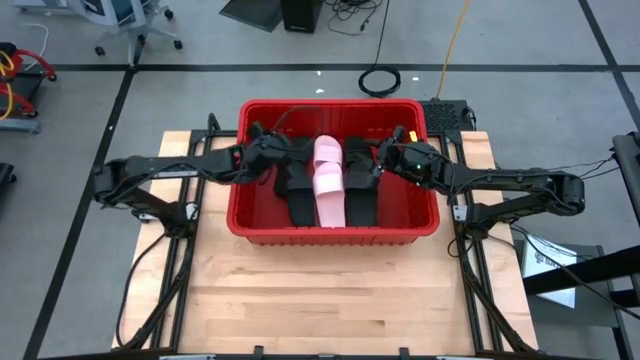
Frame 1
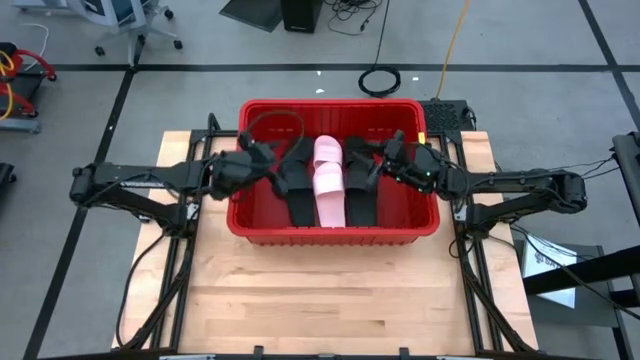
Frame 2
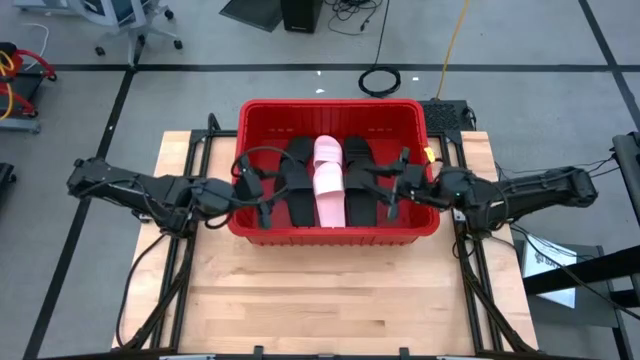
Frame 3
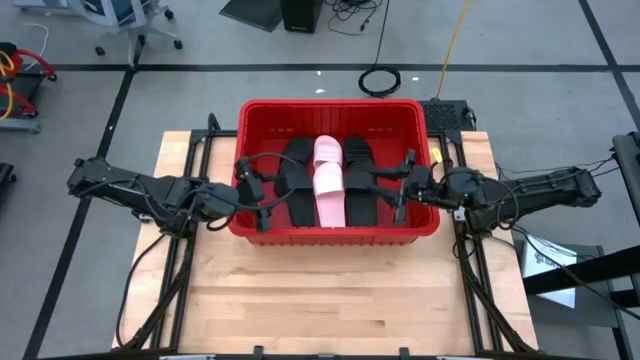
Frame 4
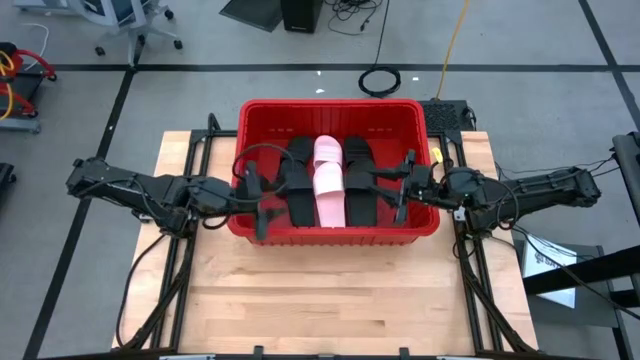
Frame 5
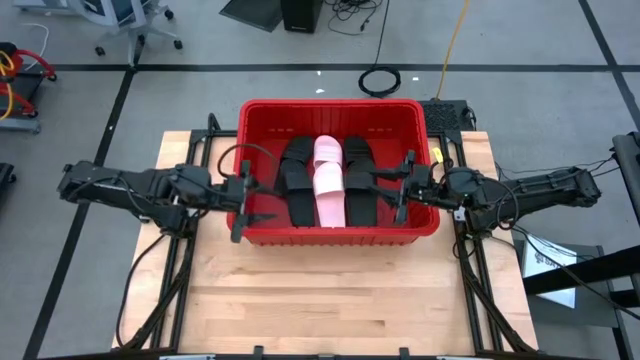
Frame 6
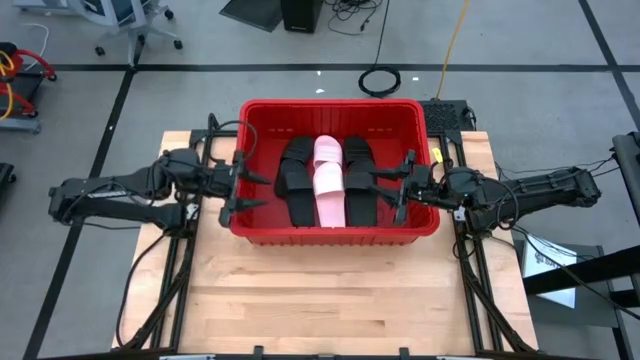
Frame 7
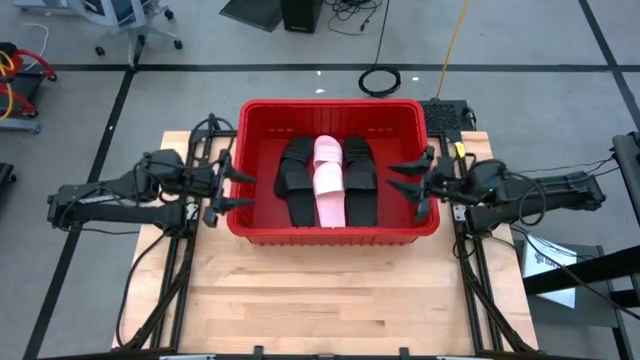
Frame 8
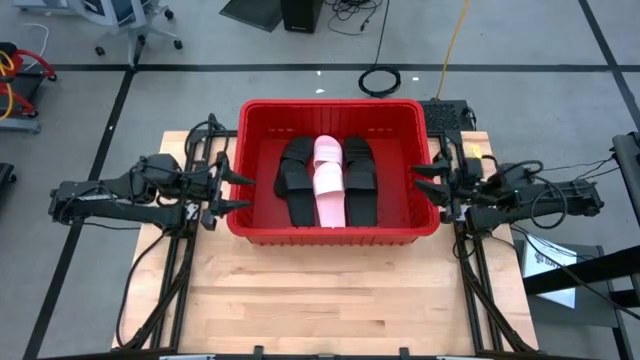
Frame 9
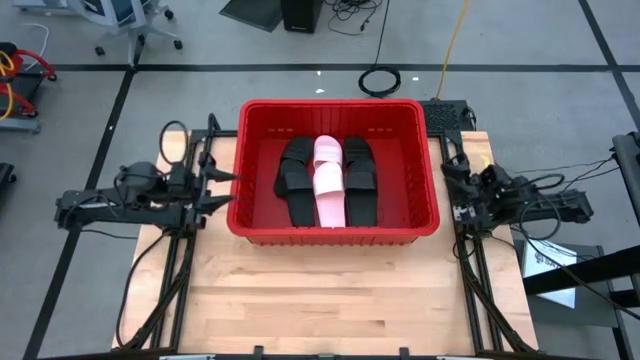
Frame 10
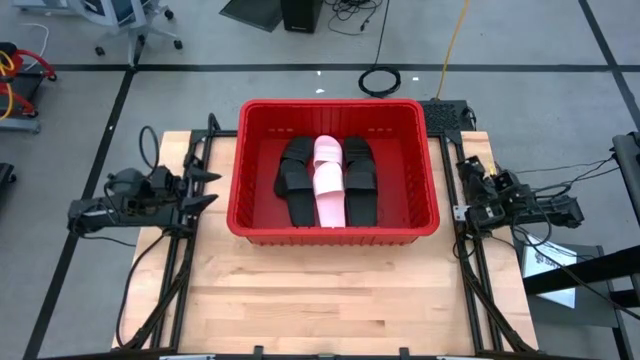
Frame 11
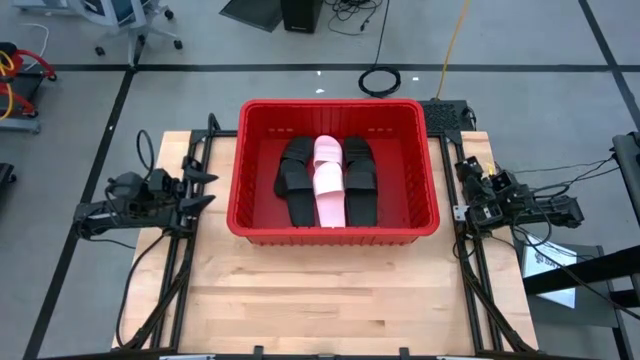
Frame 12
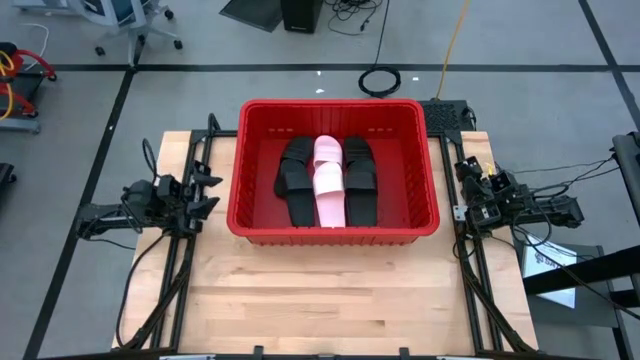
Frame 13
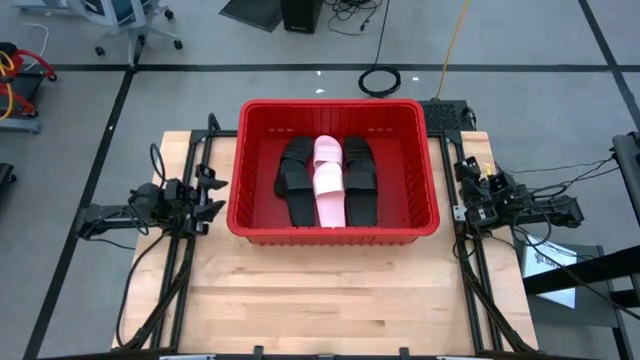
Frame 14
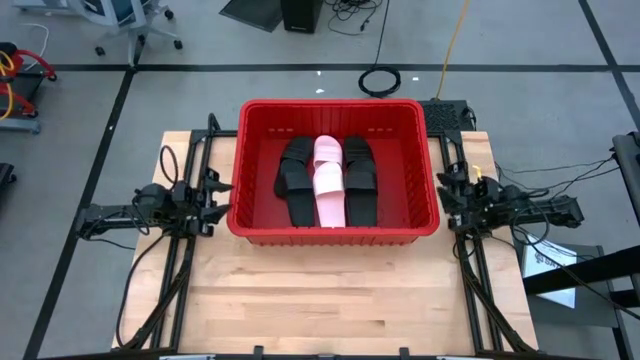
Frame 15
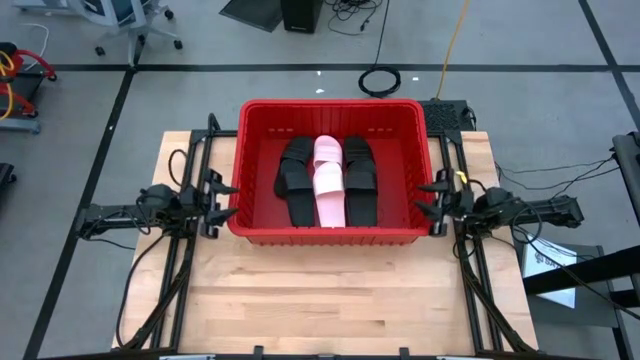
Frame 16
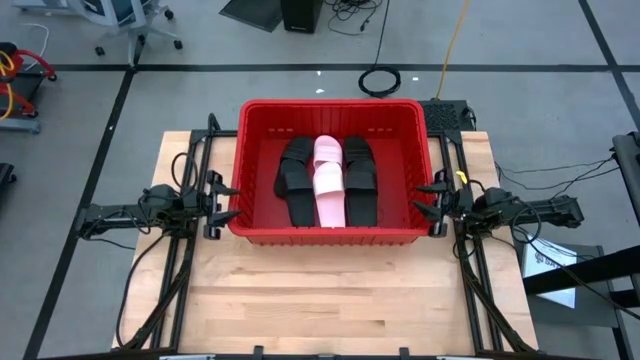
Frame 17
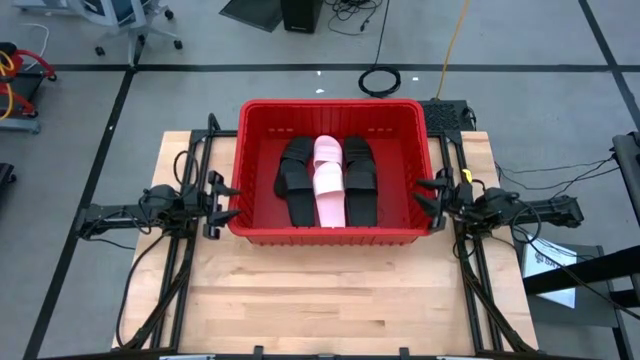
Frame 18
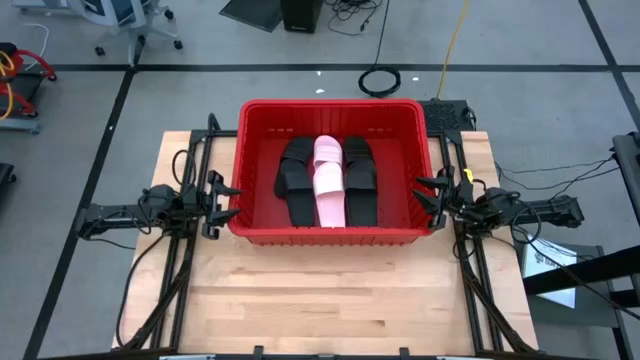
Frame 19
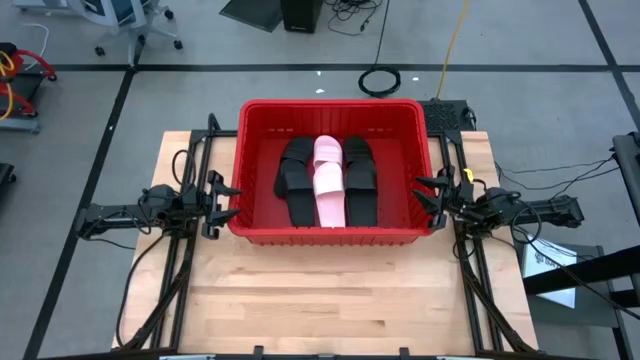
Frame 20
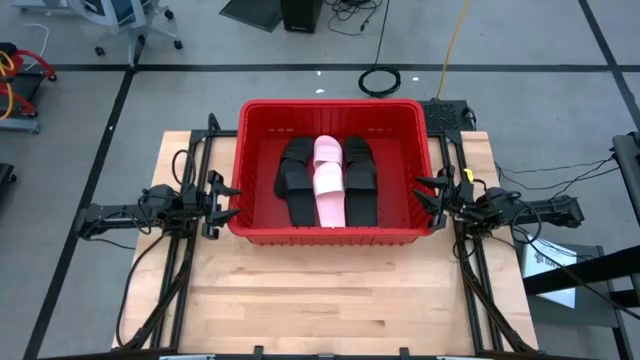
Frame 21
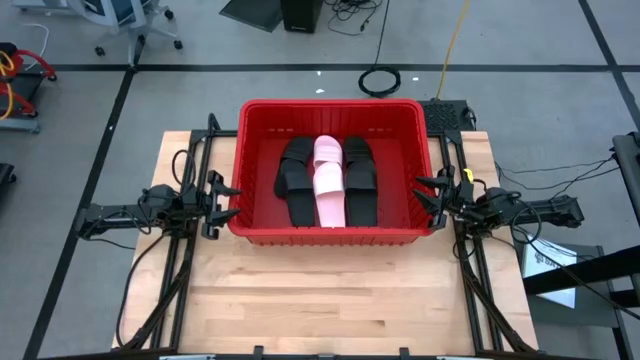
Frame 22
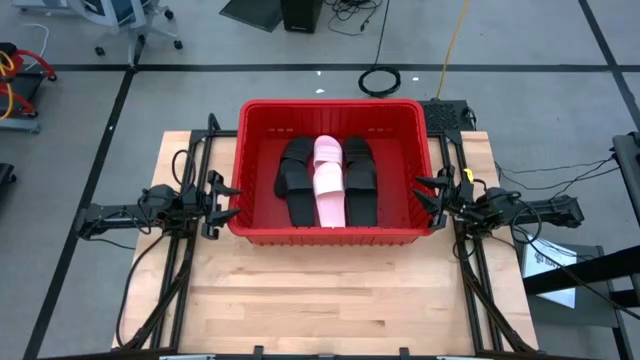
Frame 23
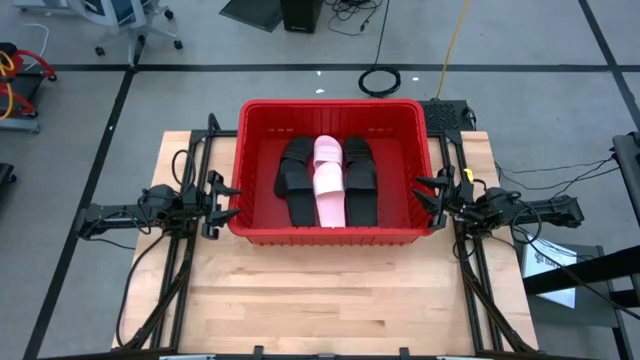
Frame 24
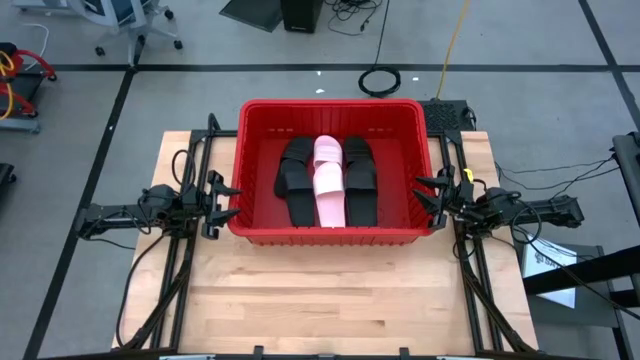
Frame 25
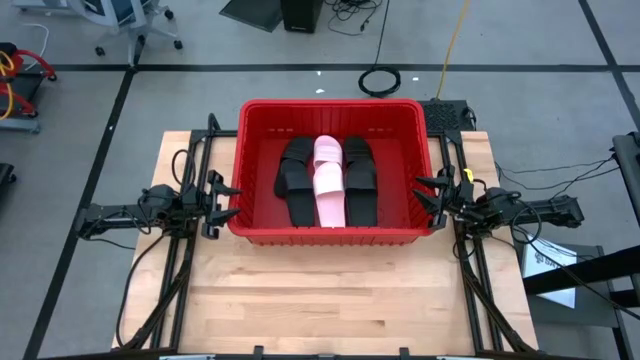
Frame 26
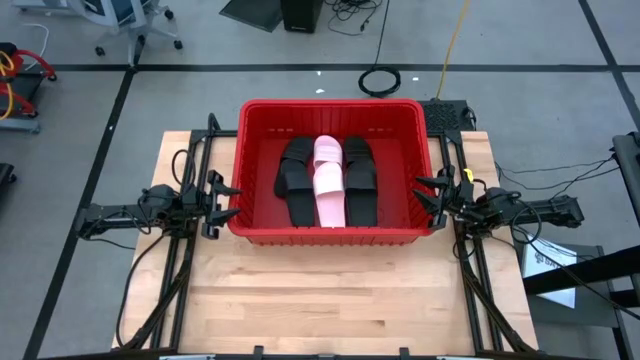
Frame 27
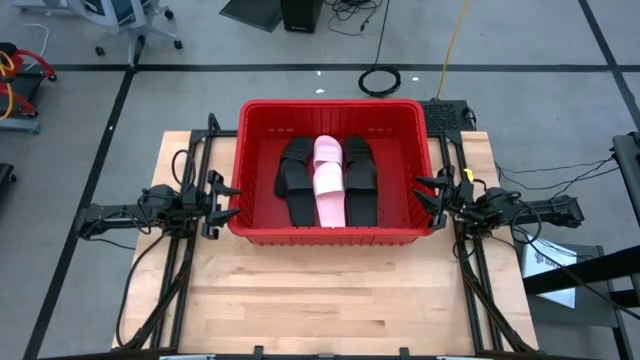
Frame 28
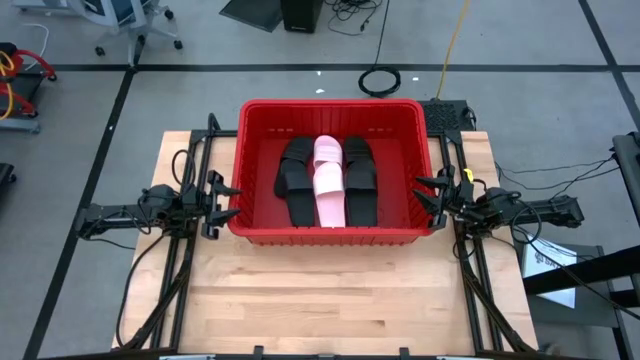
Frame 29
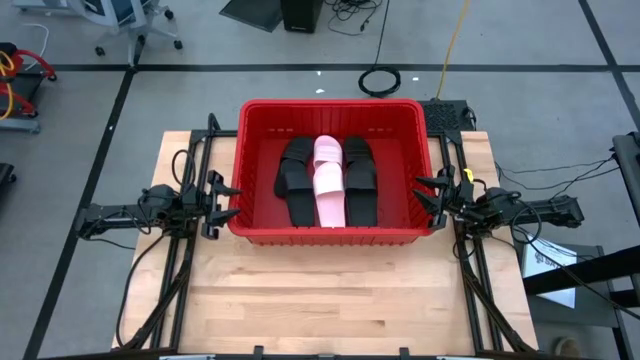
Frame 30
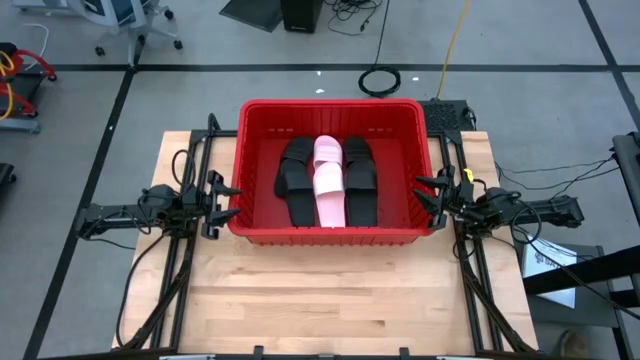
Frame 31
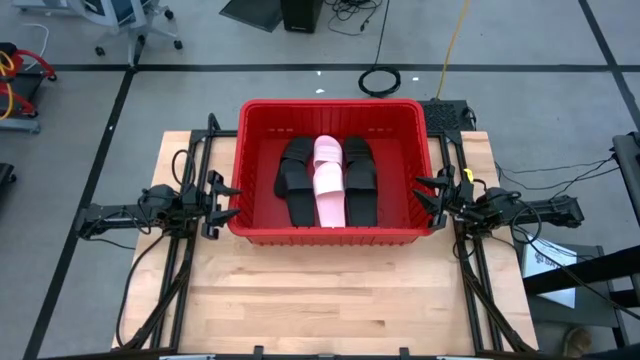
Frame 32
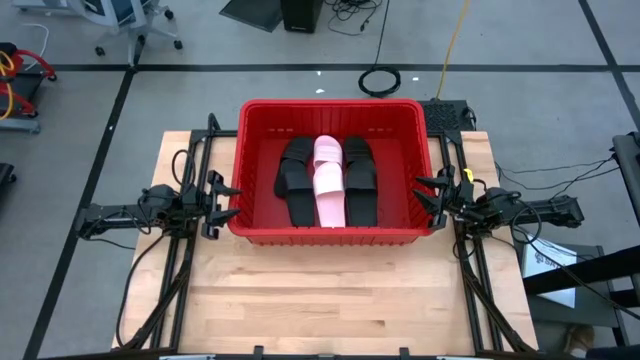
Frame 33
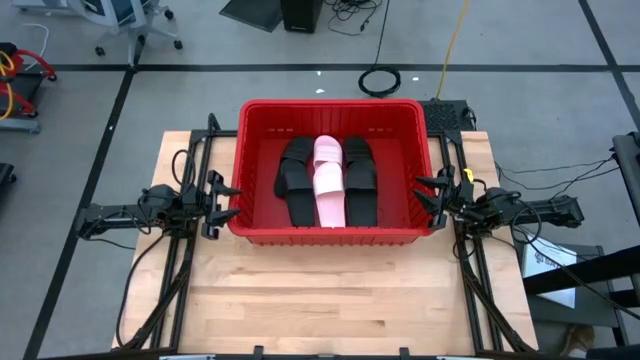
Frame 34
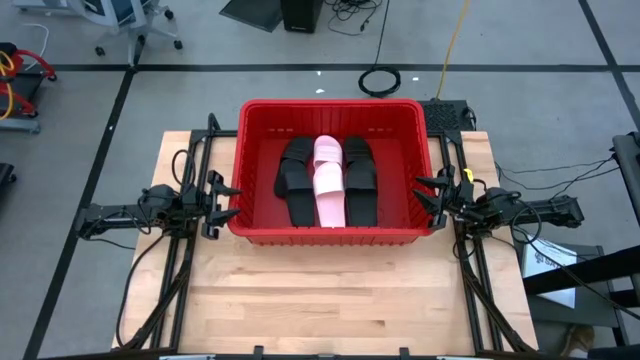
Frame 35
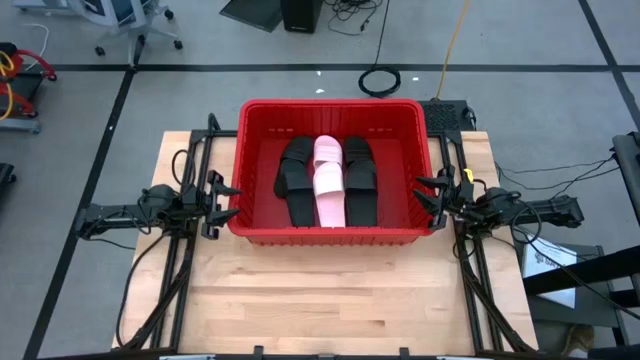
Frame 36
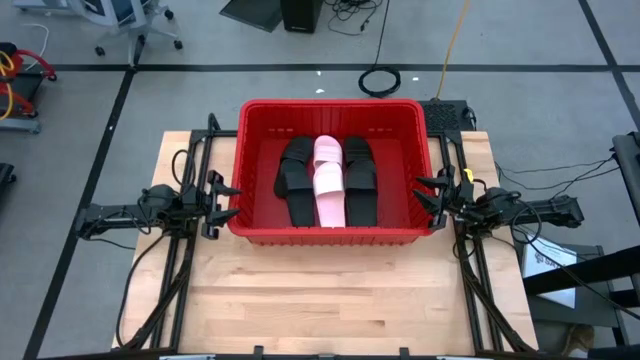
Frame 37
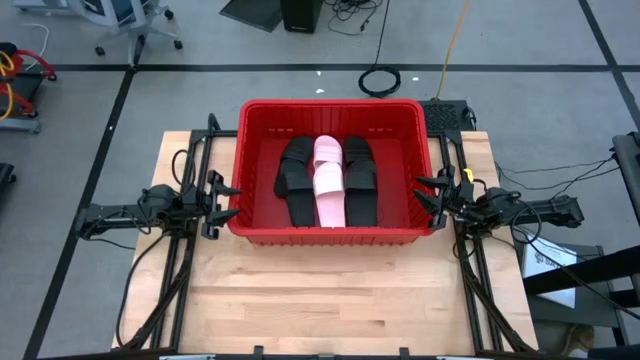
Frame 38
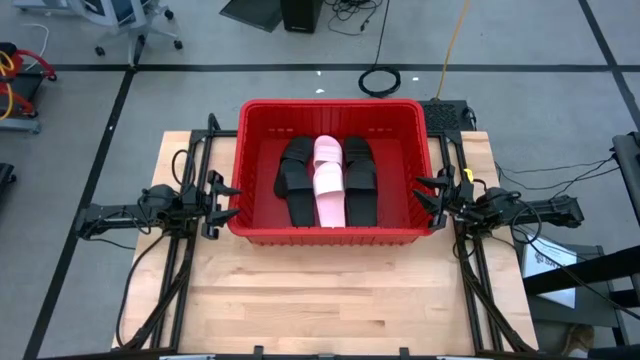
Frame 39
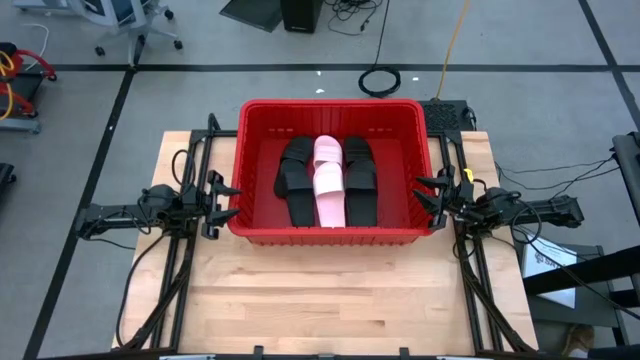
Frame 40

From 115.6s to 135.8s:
Task: Pick and place slides into bin
Return to Home Position

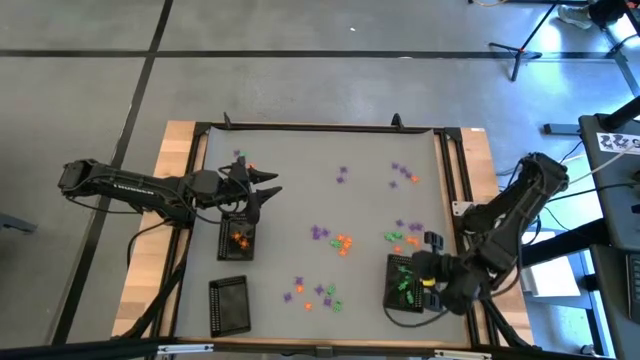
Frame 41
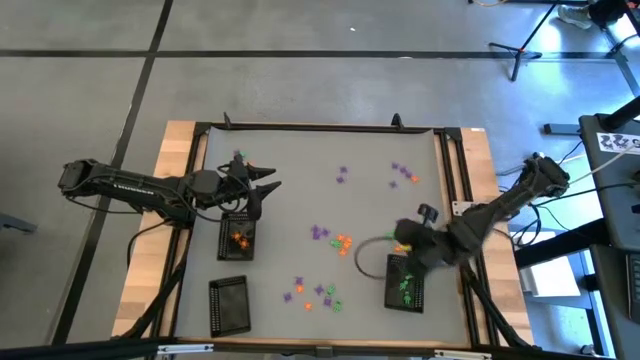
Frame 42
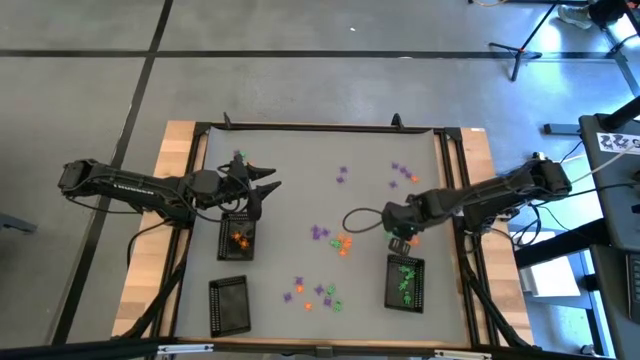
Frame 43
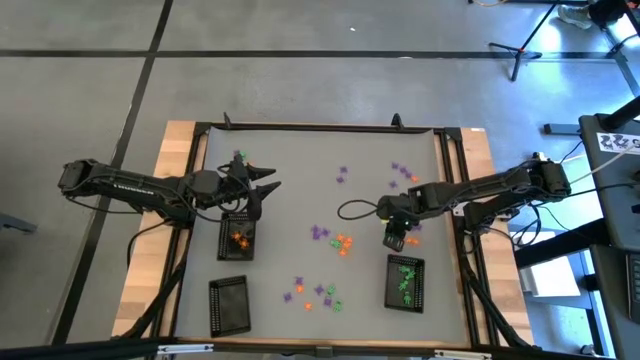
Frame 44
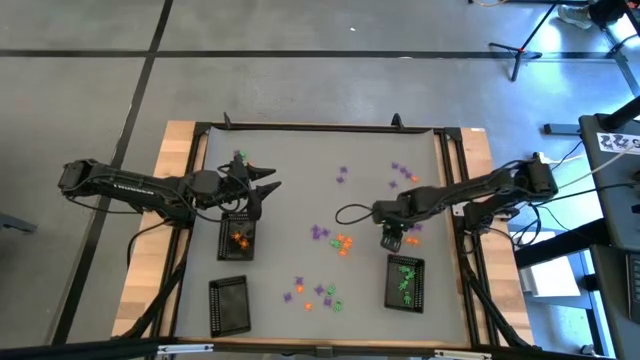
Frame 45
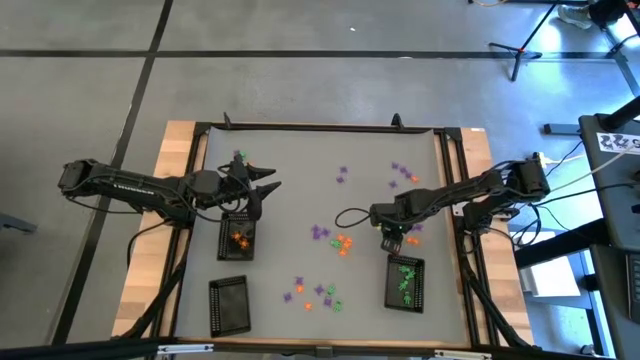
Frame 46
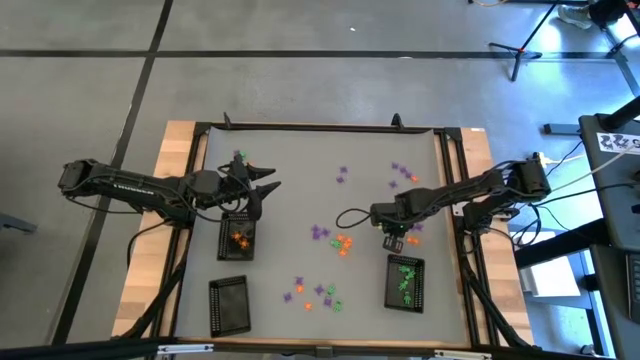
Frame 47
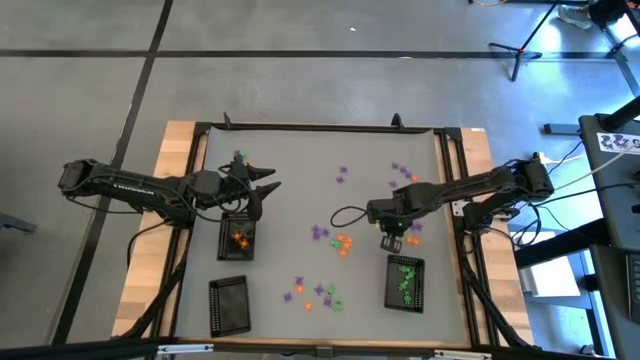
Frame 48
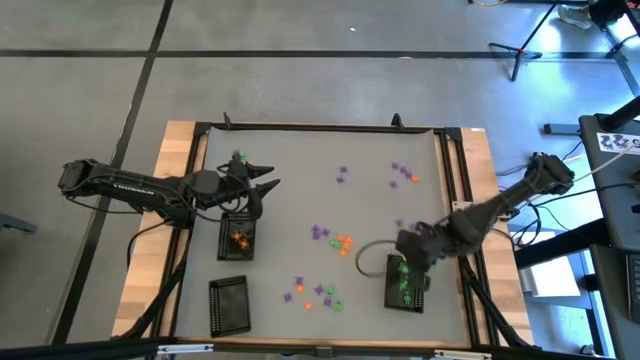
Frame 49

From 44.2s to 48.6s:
Task: Sort Halloween decoration
Put the green skeleton toy into the bottom right black basket
